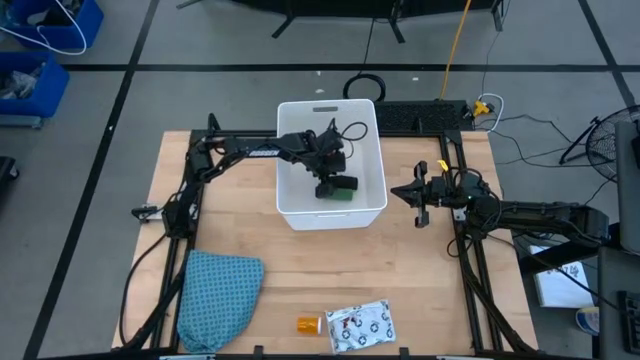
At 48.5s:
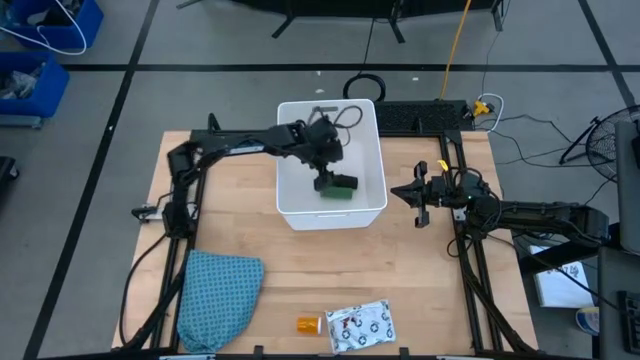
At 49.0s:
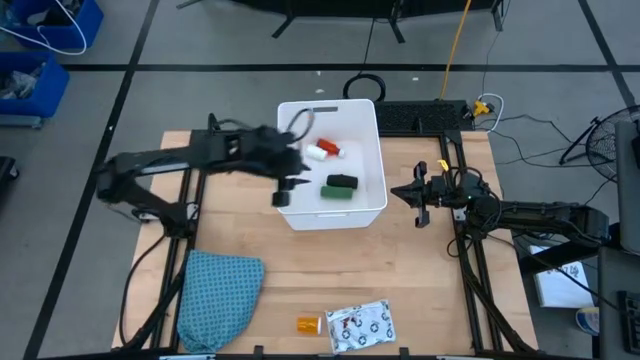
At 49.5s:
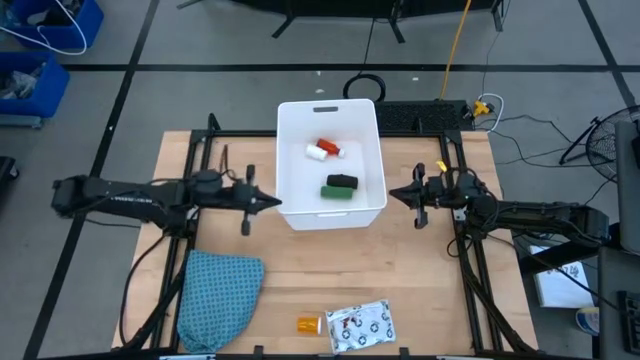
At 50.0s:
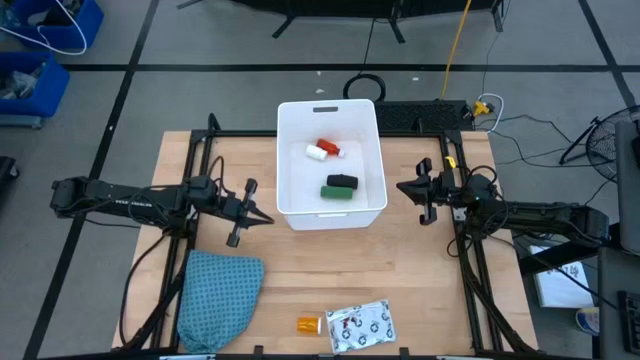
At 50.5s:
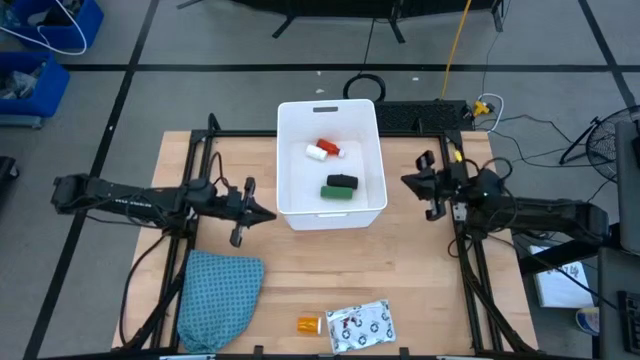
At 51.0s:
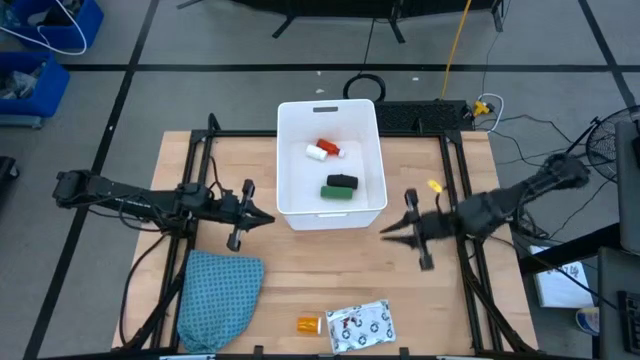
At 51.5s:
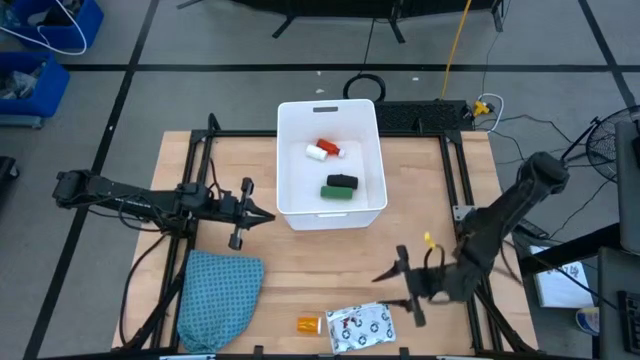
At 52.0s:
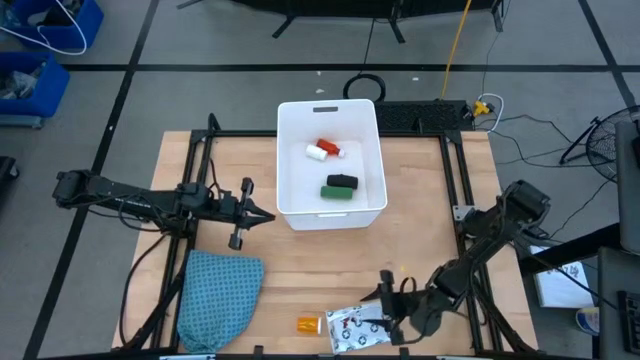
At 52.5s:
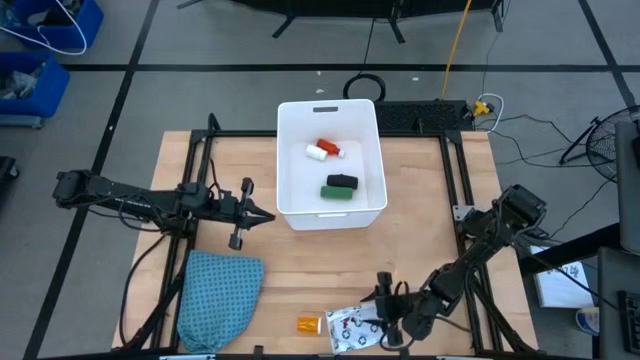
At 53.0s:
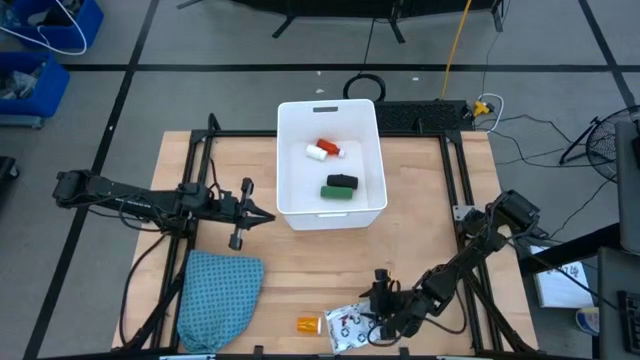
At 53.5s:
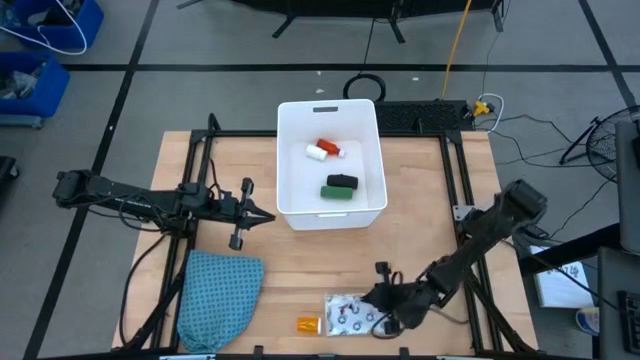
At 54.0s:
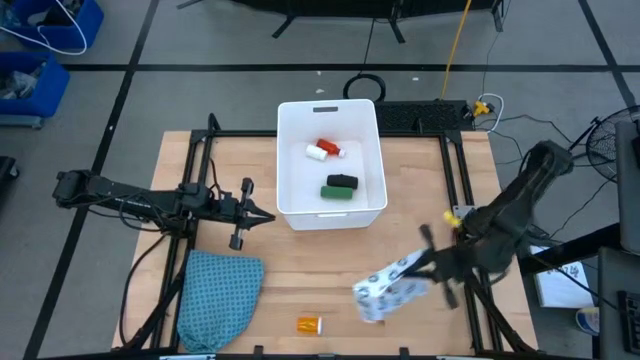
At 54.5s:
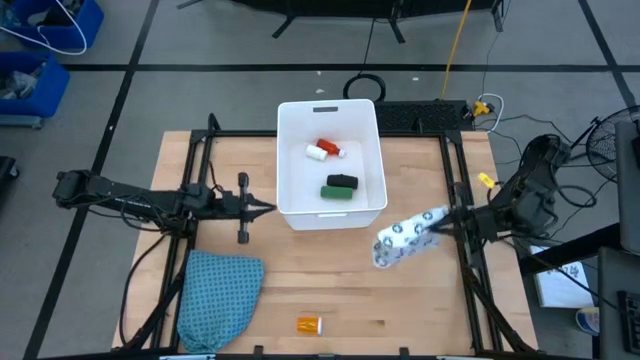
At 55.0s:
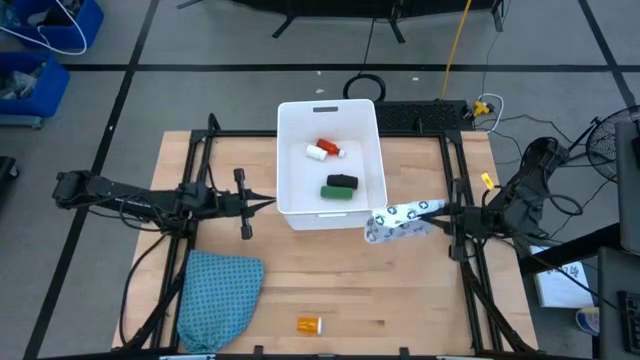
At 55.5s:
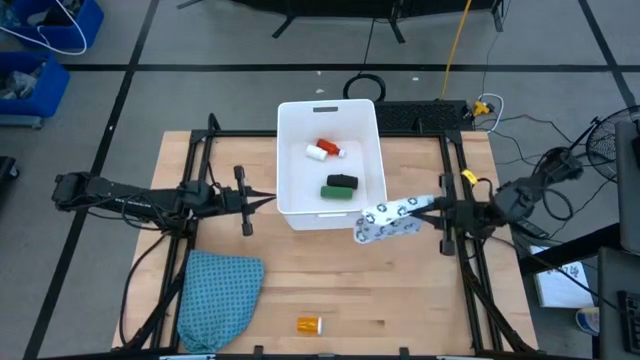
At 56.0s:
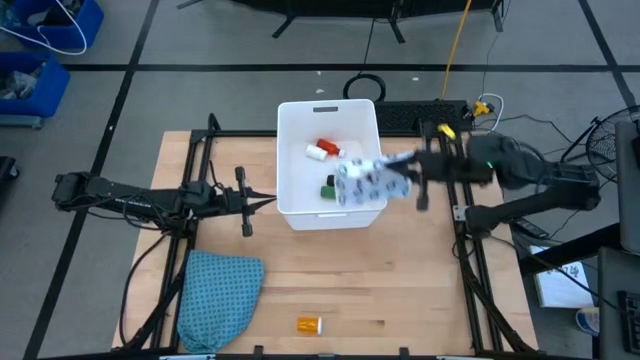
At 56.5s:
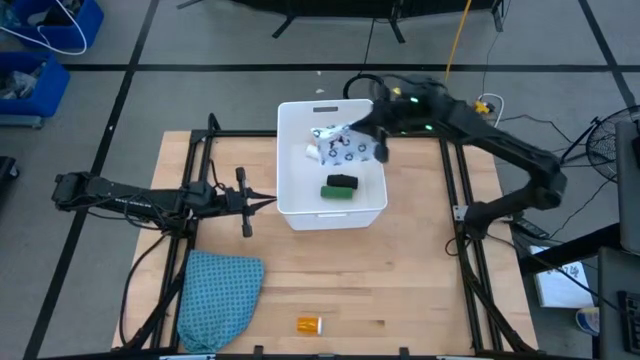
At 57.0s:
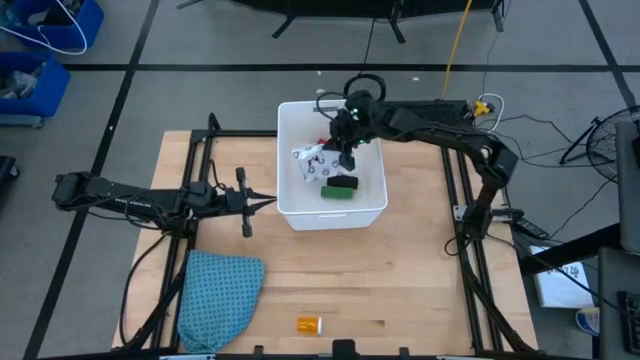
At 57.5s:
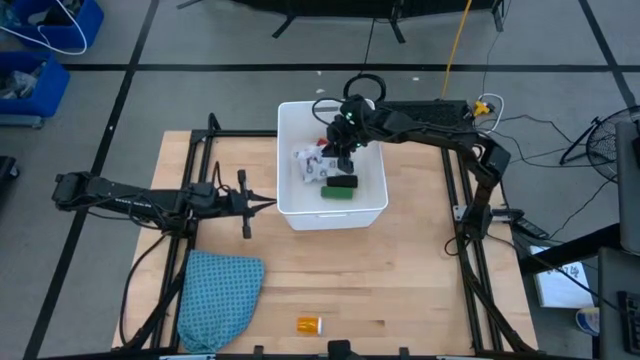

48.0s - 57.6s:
Task: Pick & place medical supplies in basket/bin
Put the white mailer bag into the white bin

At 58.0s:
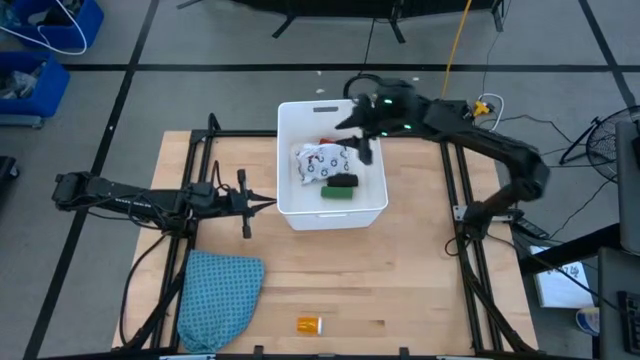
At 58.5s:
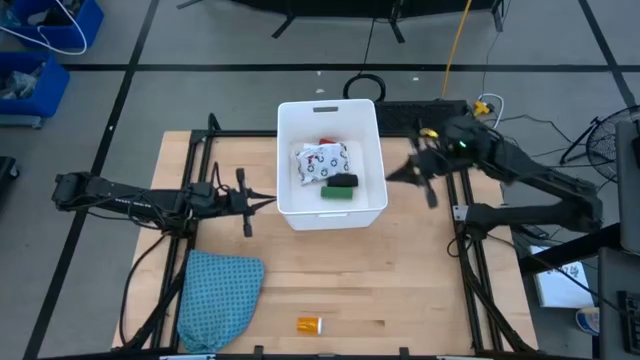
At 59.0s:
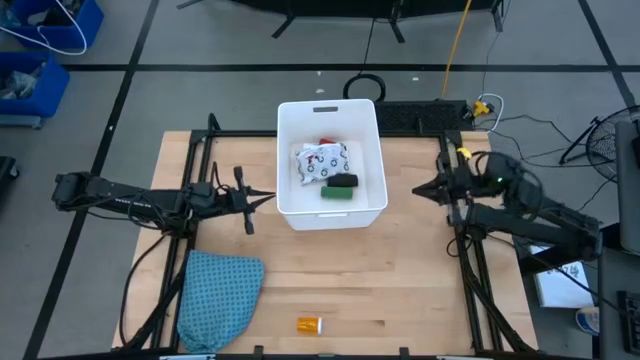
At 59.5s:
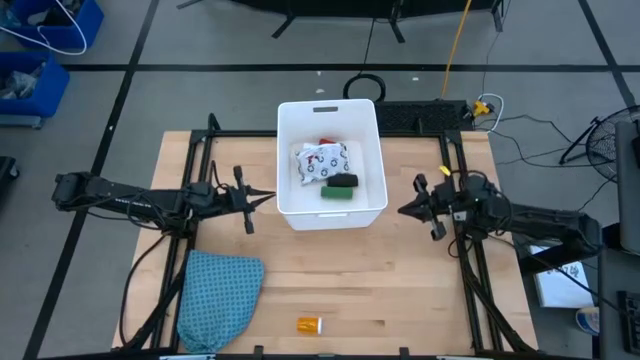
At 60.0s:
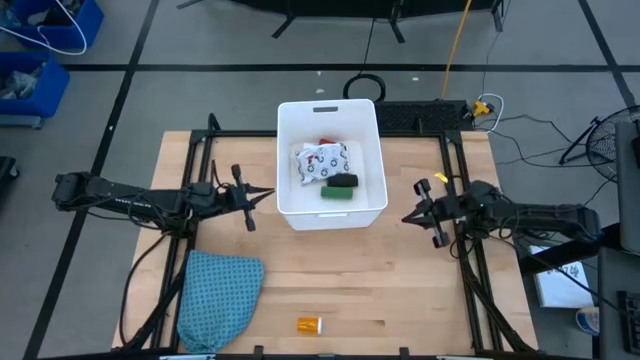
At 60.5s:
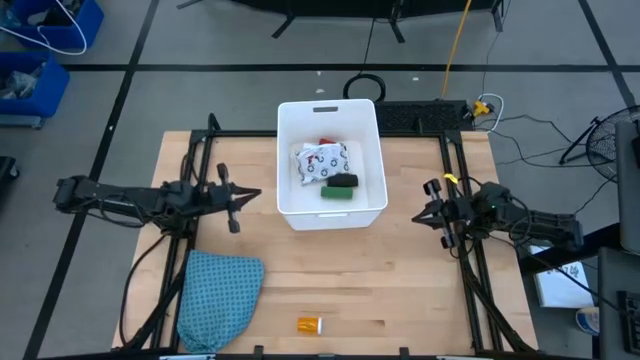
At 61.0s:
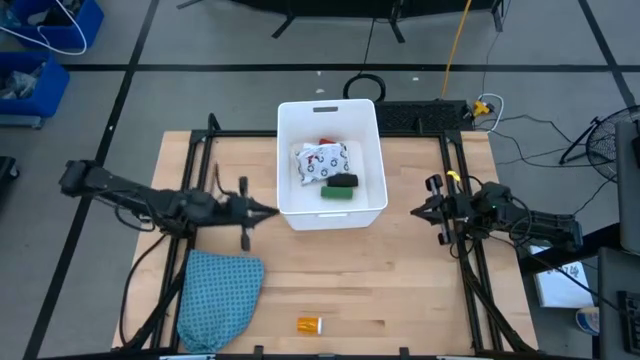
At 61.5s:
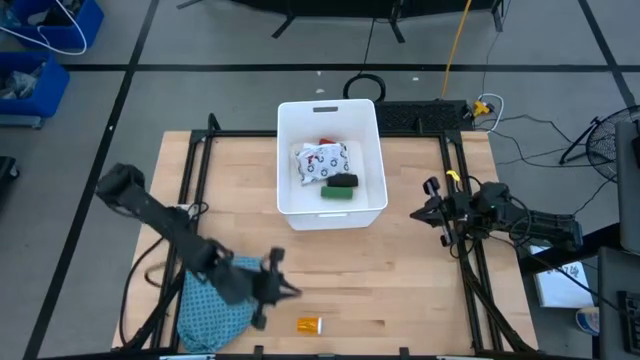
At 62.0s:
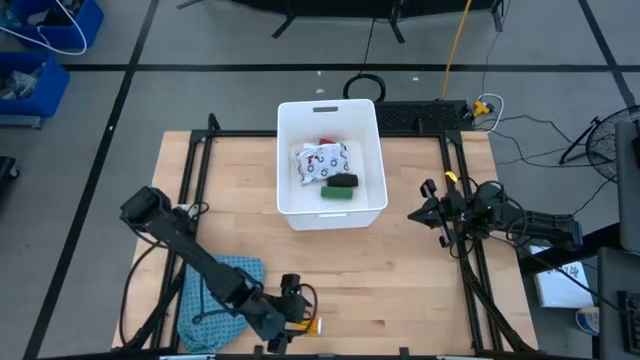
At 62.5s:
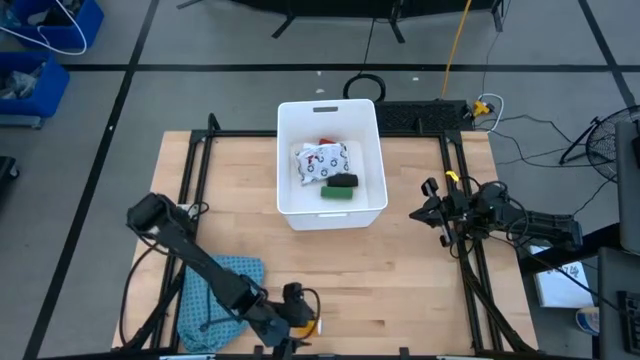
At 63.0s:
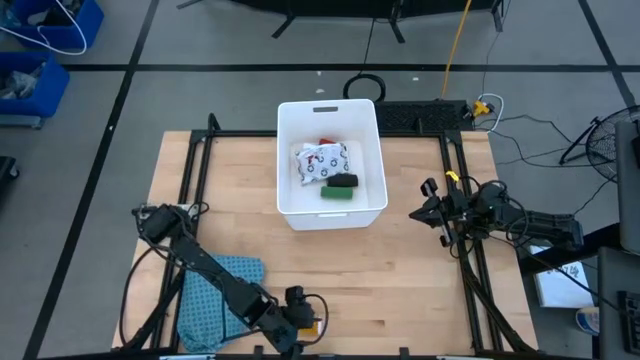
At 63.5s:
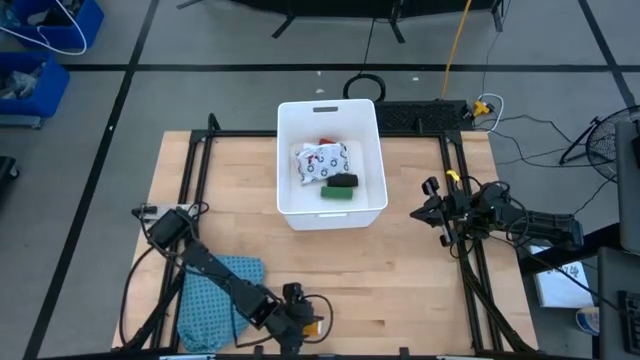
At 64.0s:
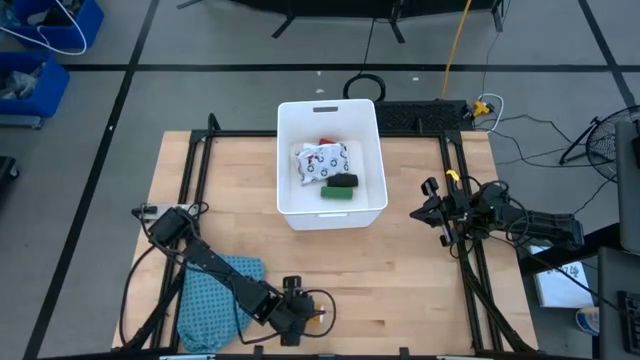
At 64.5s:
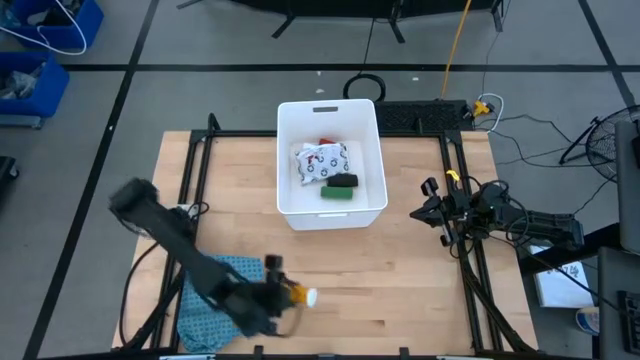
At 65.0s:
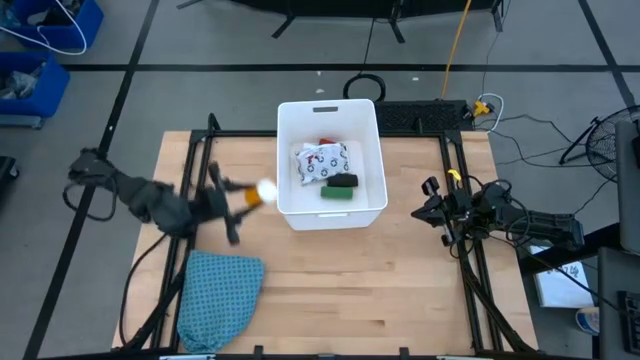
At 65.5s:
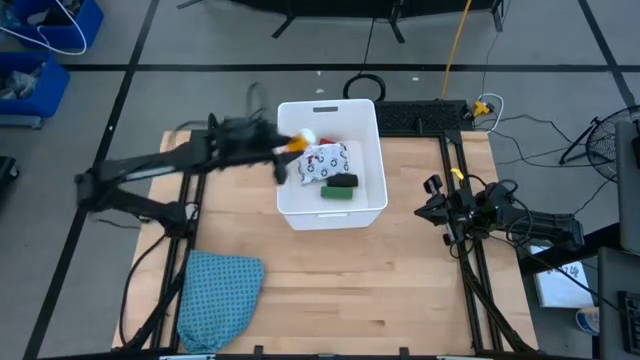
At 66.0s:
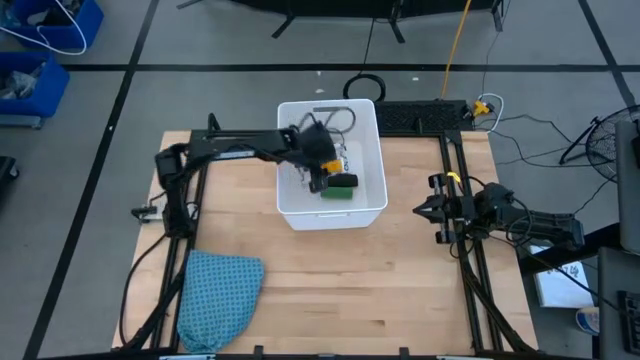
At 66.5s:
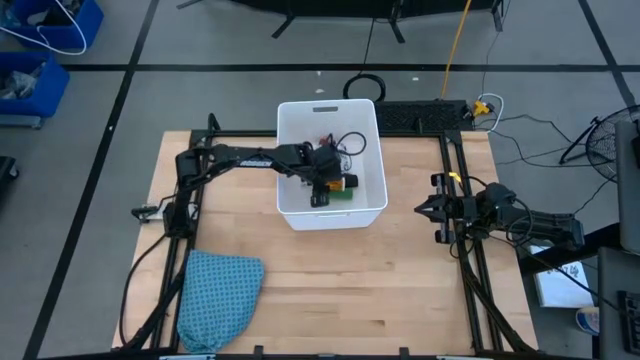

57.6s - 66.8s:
Put the orange pill bottle into the white bin

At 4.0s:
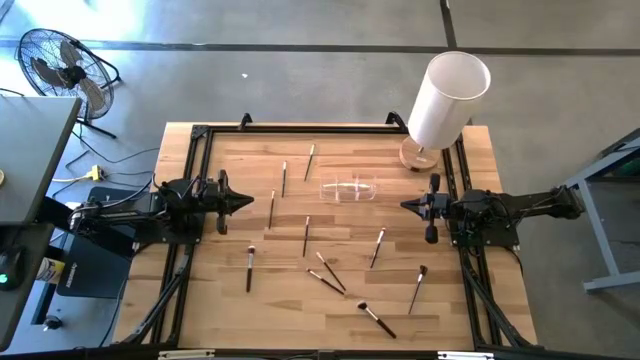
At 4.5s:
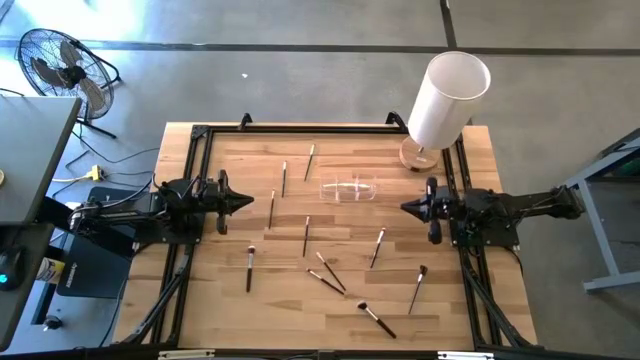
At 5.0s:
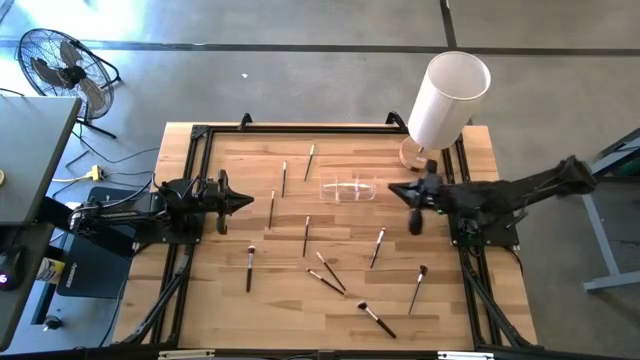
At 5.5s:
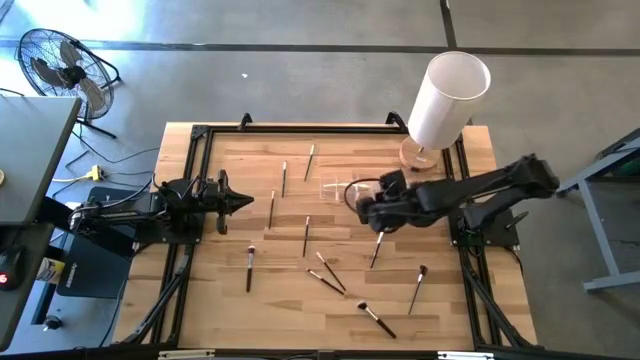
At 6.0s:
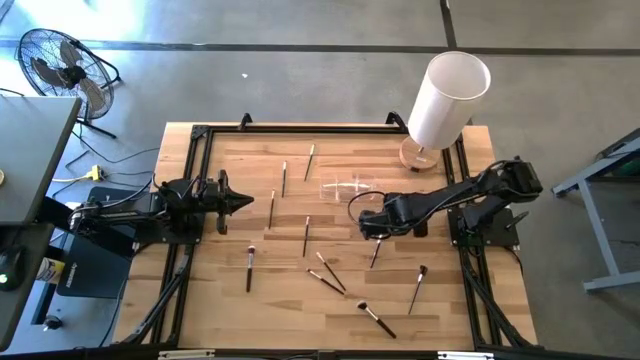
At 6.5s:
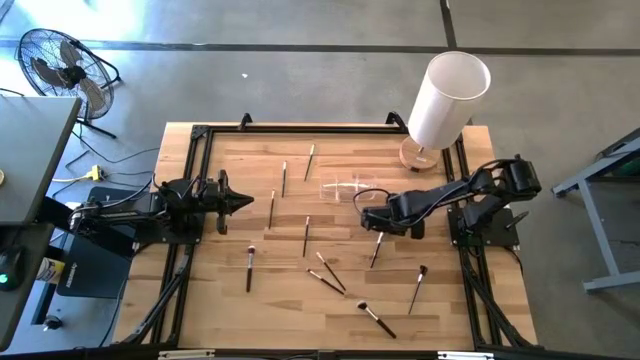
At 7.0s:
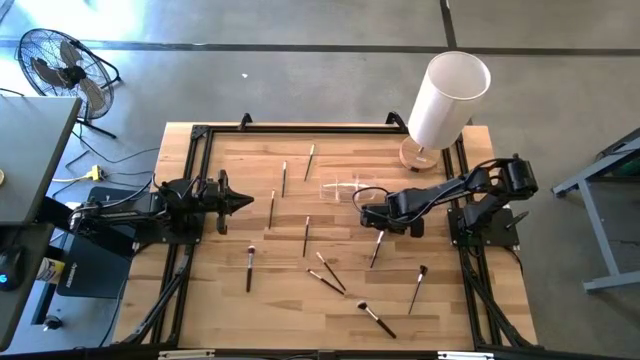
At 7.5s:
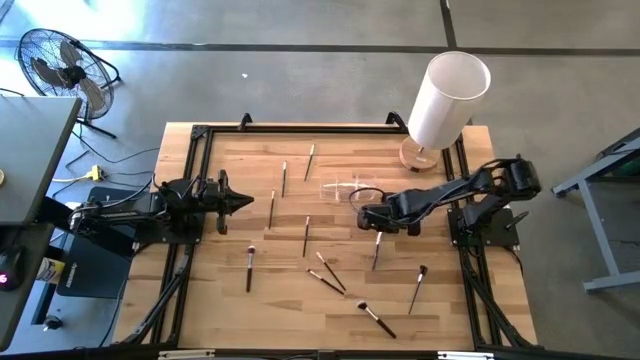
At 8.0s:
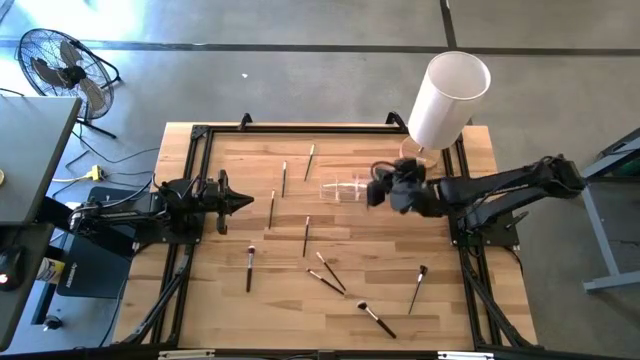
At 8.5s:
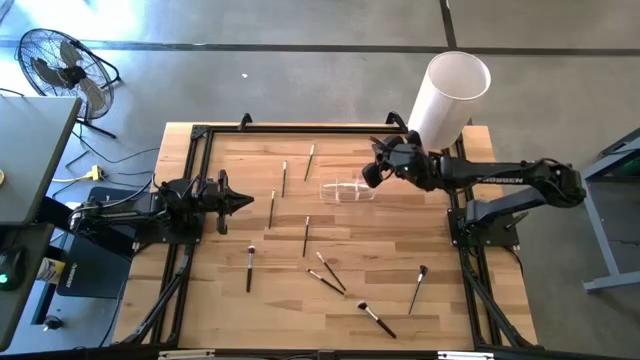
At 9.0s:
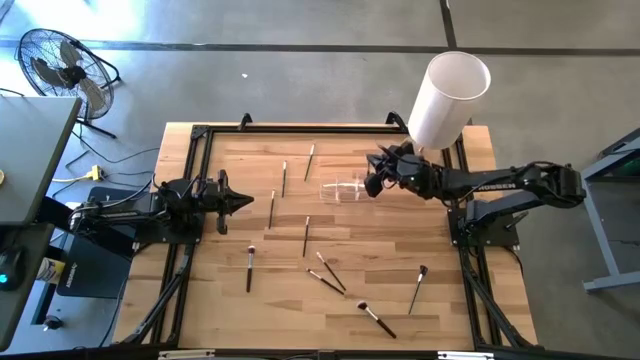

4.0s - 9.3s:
Task: Put items in baskets/containers
Put the eyeshadow brush into the right section of the transparent organizer
